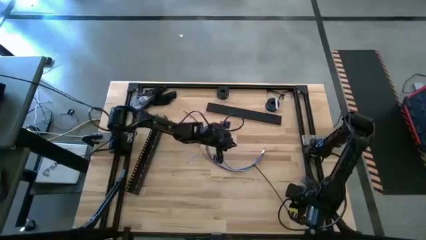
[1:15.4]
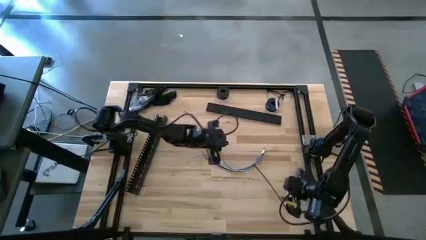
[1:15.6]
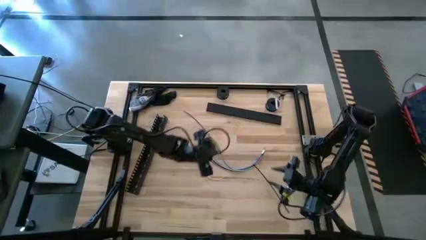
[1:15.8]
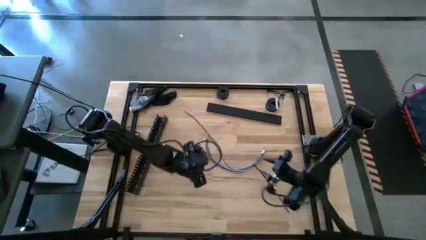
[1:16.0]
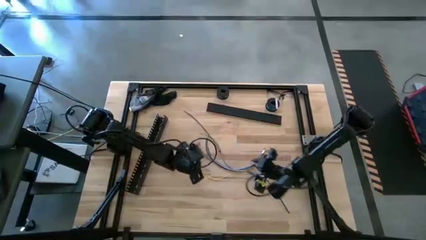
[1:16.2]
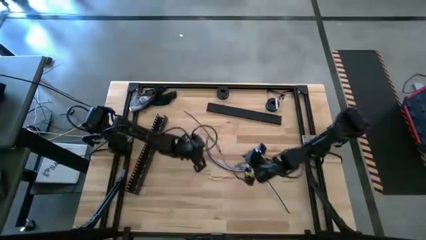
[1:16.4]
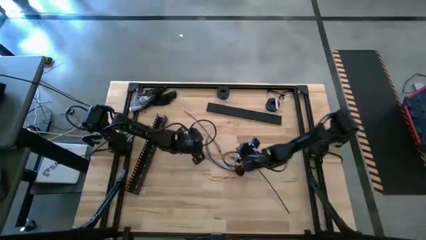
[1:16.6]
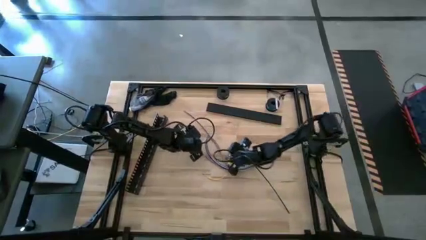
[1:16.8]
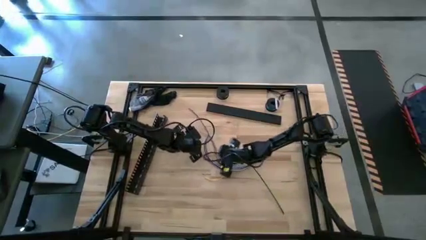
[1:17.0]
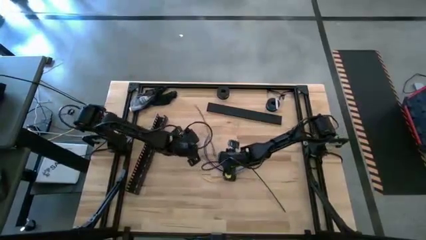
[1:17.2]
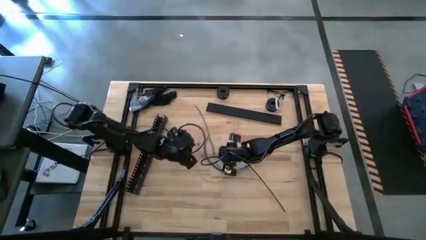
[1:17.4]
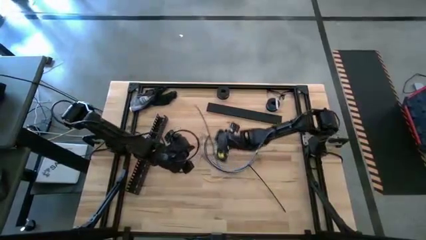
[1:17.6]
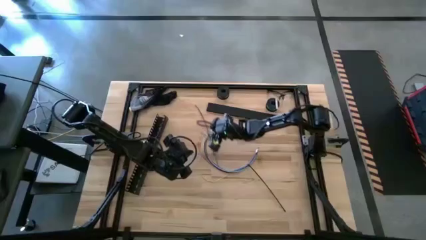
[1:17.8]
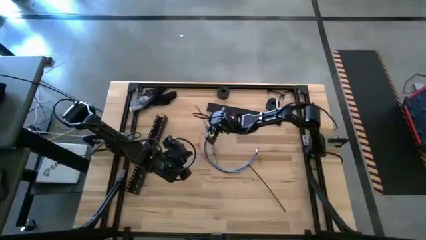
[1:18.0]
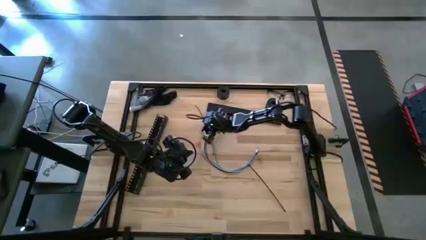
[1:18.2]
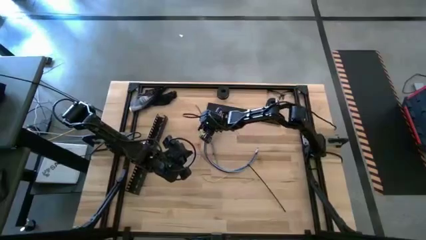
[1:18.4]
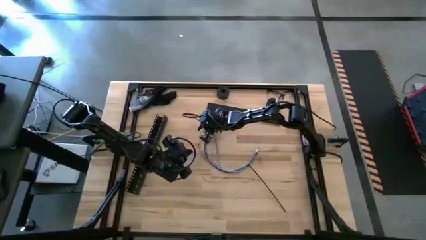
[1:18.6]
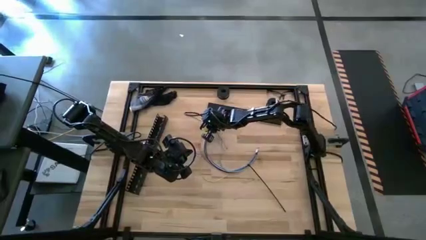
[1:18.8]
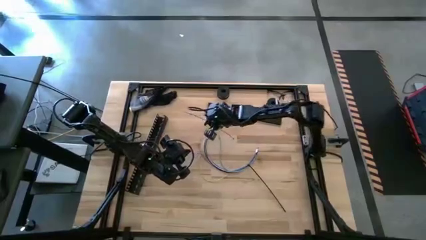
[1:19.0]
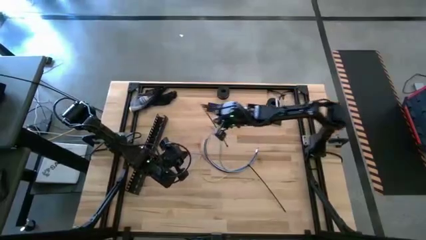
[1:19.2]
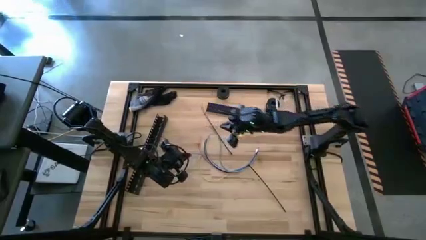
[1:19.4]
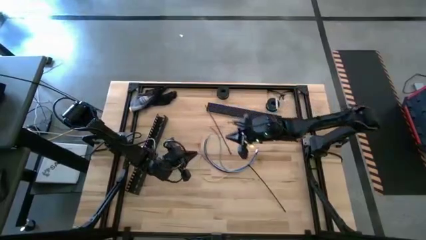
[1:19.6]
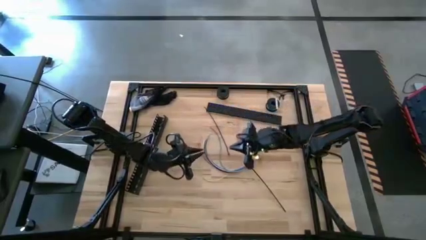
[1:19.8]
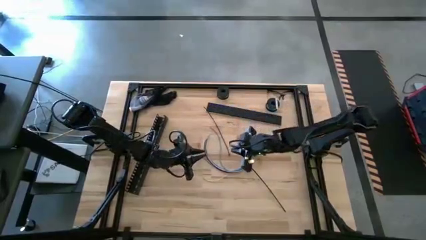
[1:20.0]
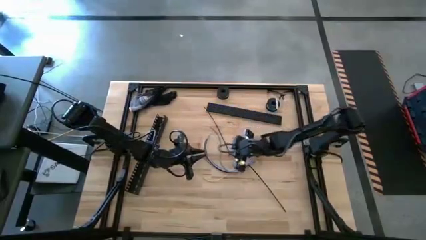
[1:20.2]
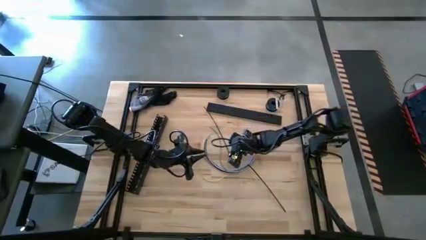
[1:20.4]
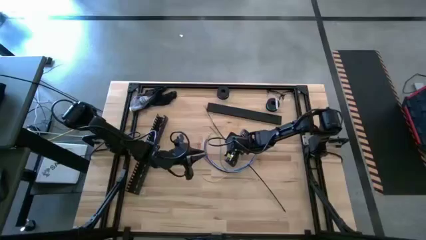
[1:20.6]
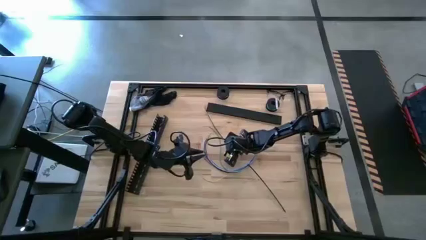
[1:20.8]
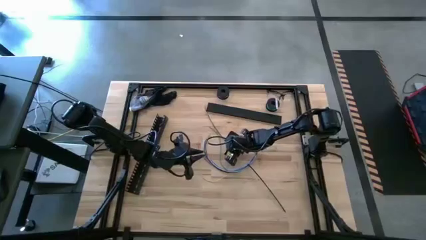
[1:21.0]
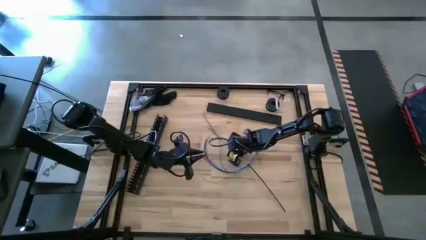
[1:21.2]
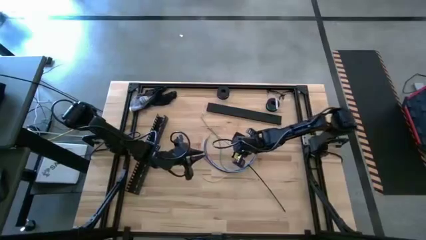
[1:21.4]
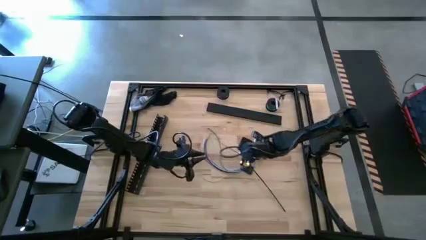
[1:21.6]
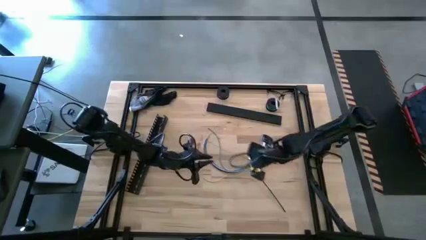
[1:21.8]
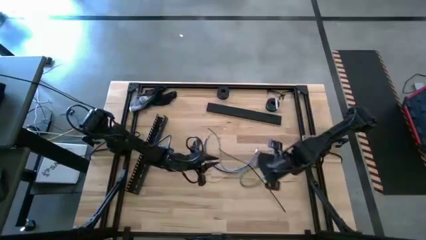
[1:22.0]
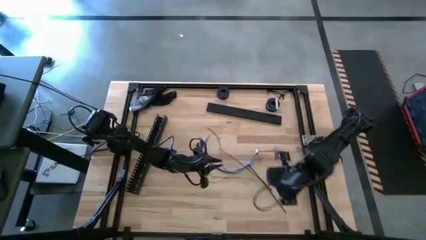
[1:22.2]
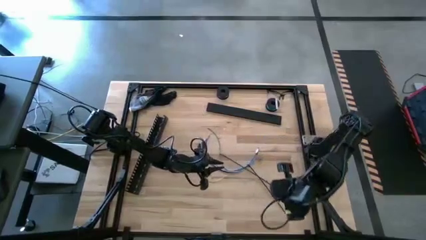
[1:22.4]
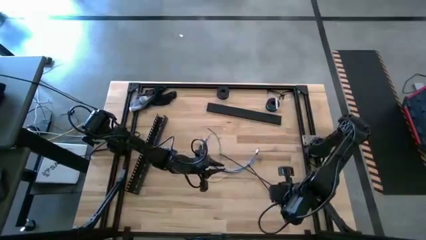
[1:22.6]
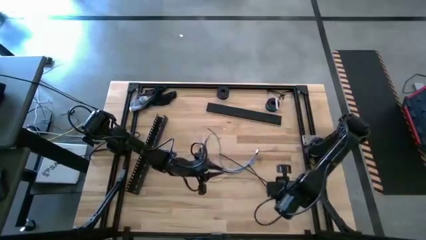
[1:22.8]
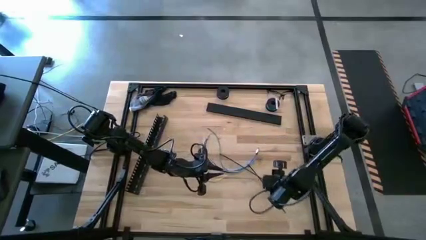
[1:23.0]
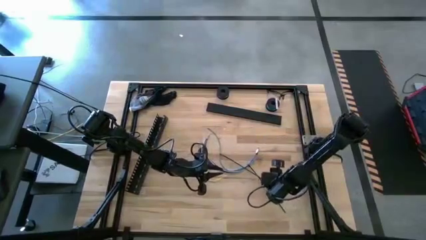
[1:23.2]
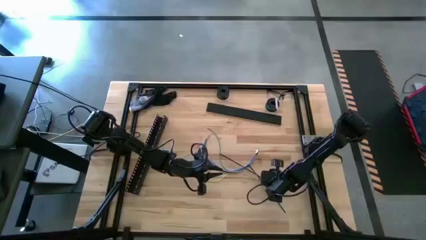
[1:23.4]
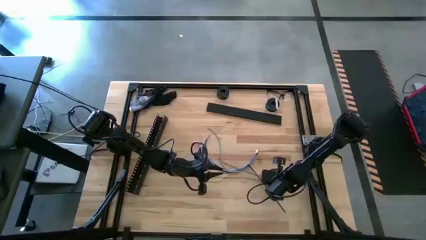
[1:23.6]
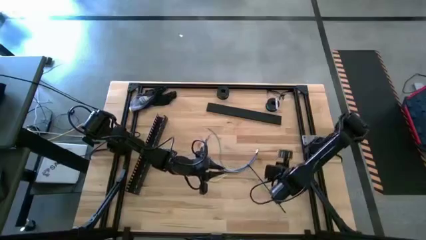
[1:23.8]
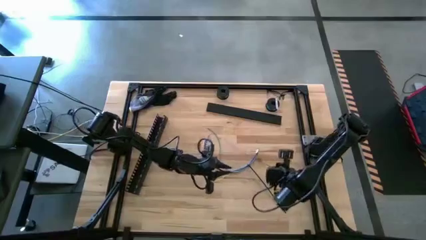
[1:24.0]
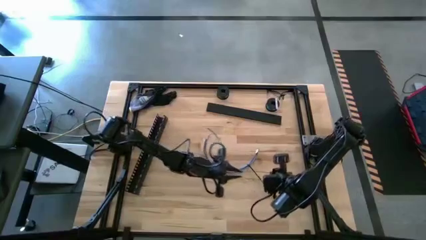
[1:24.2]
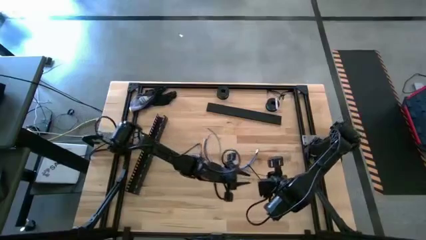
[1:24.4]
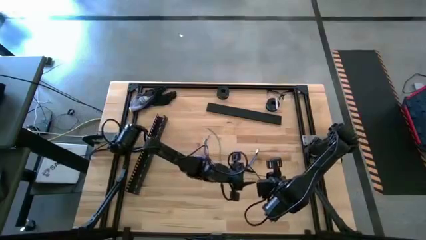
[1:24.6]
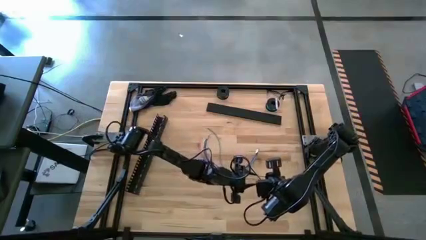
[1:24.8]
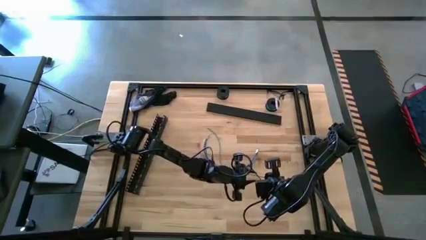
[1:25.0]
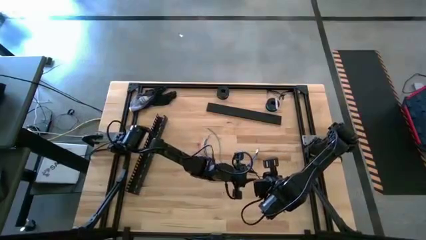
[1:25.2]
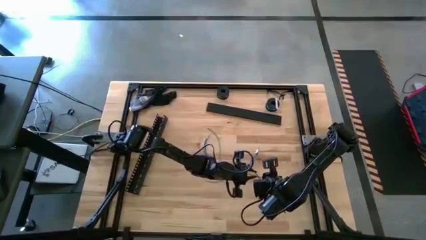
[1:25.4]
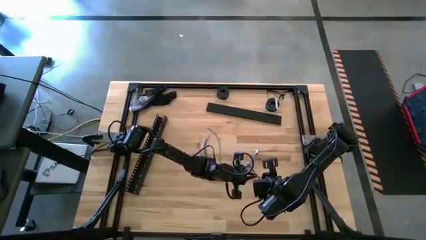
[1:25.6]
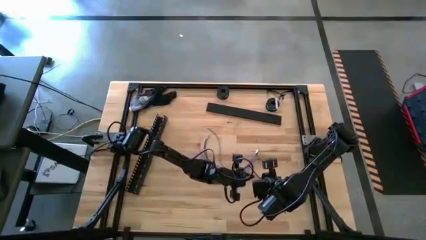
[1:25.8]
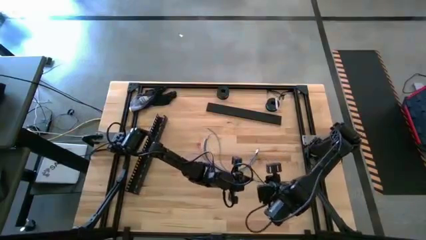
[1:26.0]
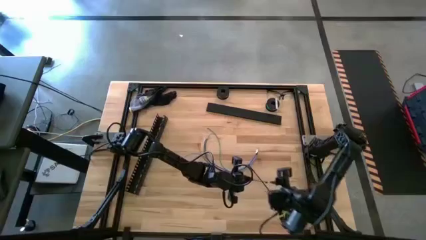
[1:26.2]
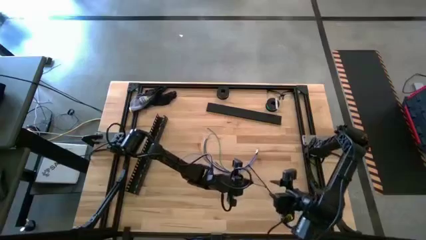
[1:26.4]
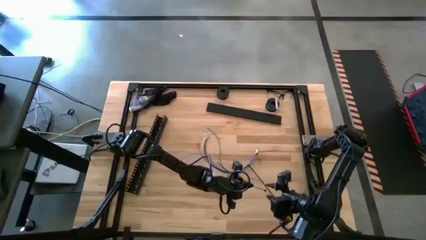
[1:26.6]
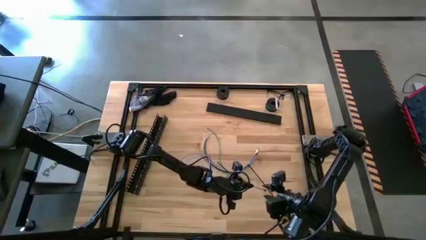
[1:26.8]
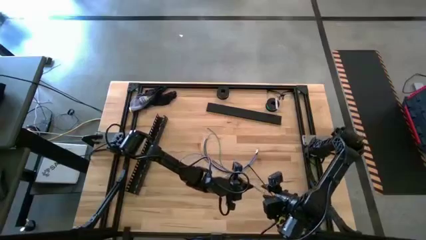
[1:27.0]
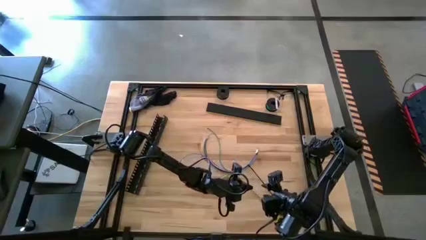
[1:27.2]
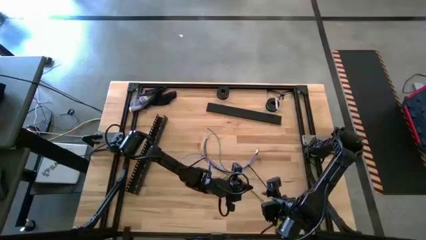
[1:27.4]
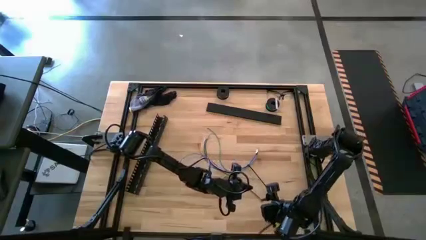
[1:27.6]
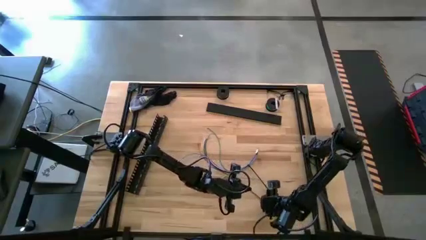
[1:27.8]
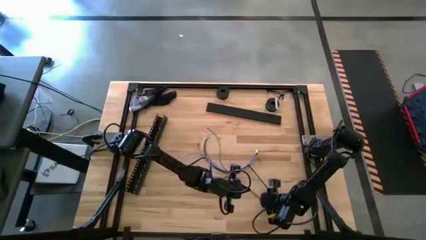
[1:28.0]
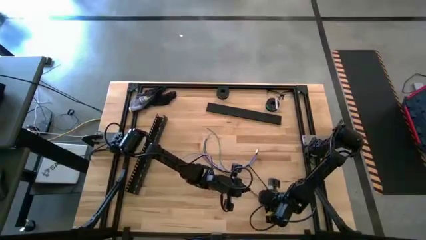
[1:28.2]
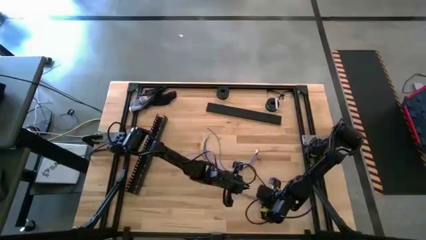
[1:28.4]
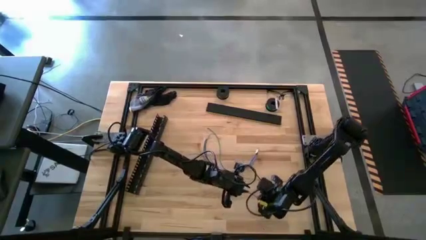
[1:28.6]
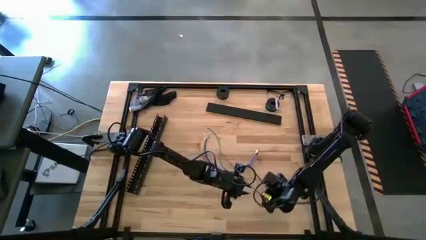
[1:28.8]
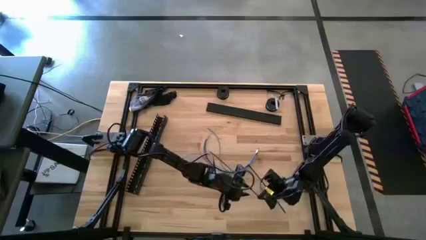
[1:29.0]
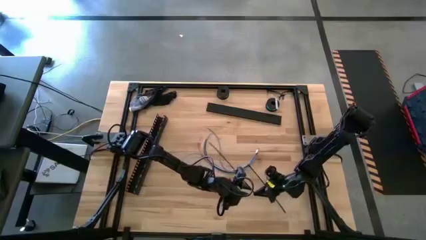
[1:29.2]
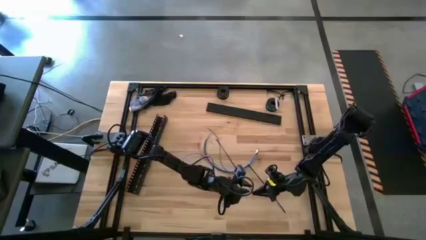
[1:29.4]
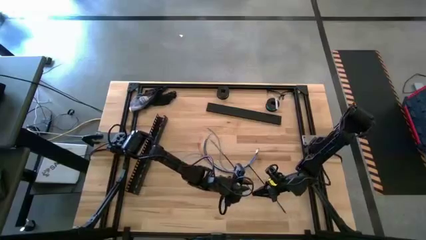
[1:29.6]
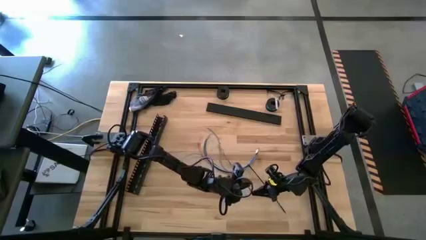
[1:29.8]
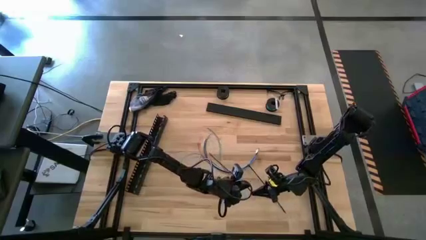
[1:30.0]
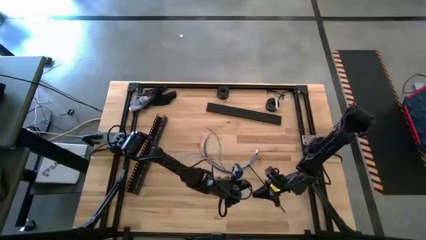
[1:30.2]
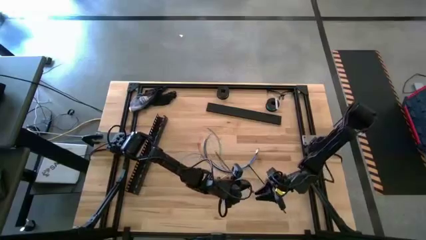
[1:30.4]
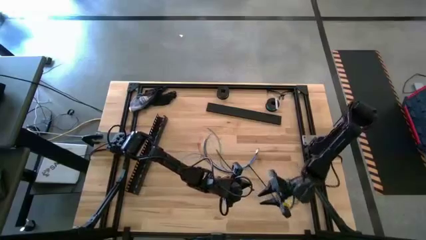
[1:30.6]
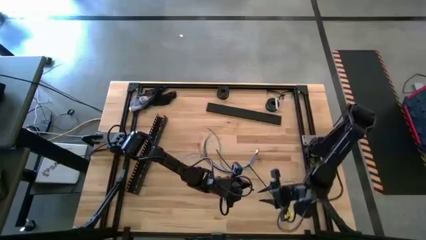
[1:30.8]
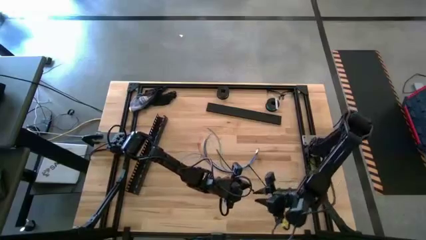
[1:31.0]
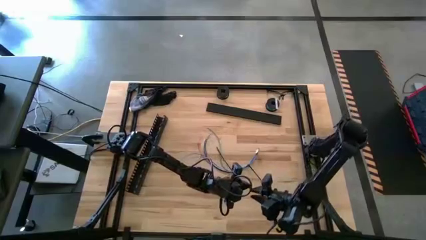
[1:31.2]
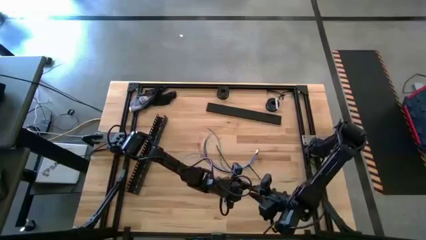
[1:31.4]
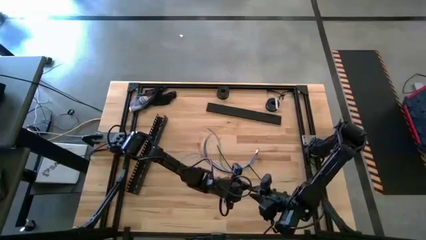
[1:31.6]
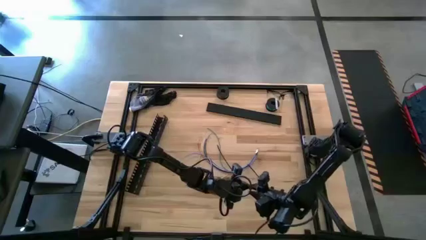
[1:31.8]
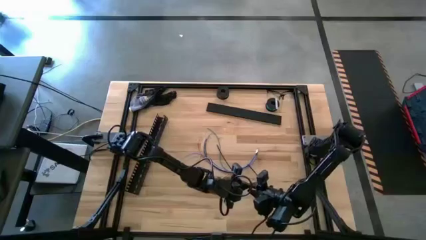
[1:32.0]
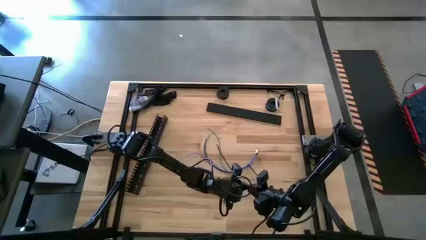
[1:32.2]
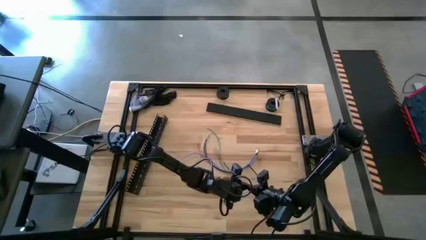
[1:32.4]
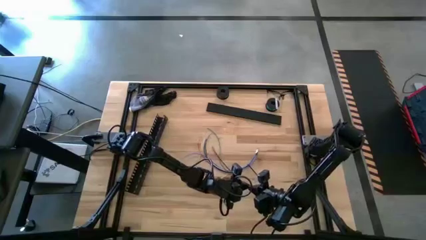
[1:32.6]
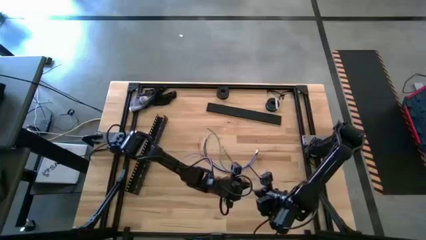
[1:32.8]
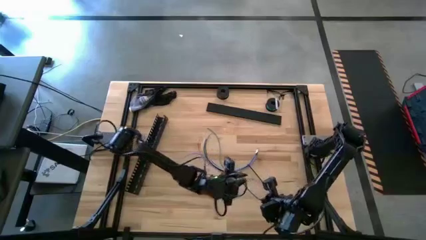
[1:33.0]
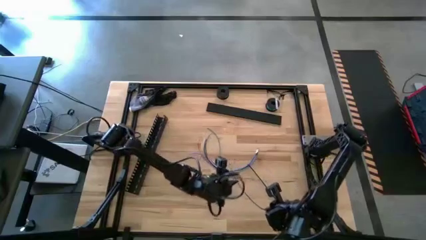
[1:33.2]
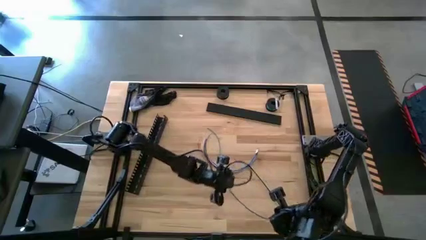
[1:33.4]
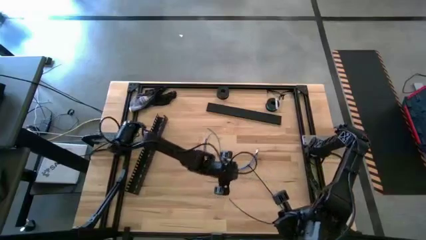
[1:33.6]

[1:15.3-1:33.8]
Task: Ziptie cables
Insert the cable zip tie into the cable wires
